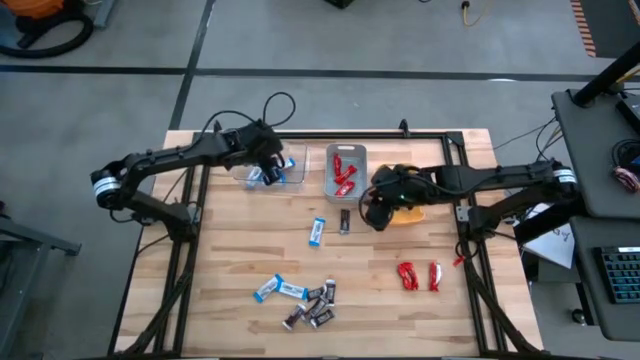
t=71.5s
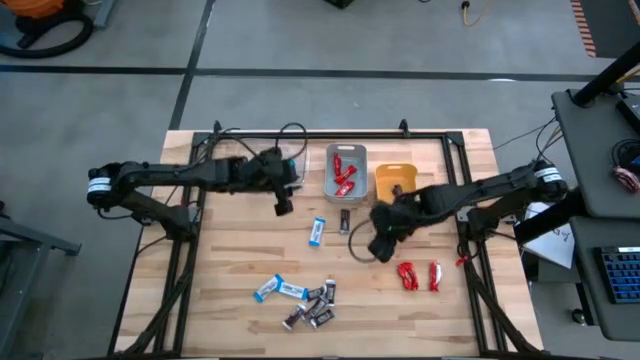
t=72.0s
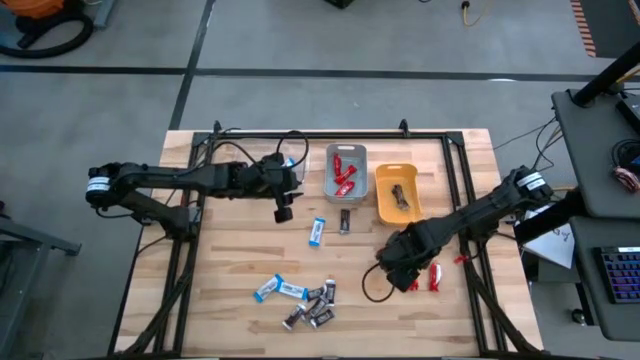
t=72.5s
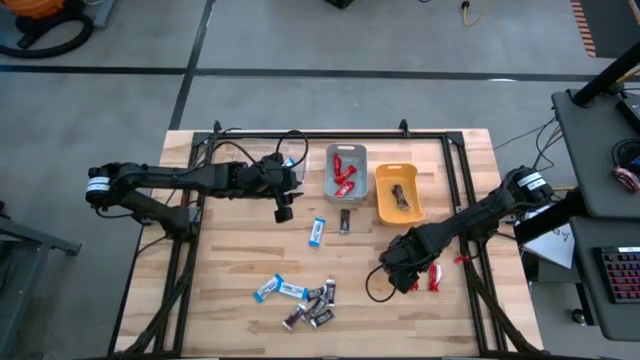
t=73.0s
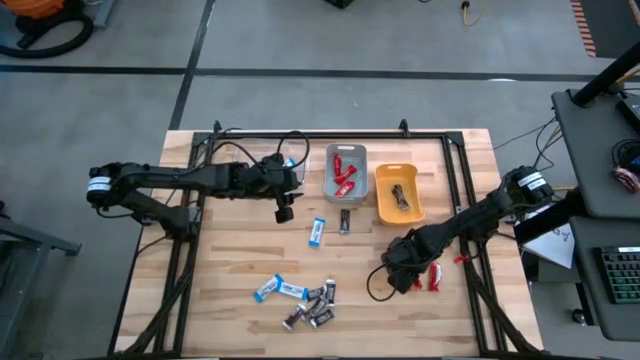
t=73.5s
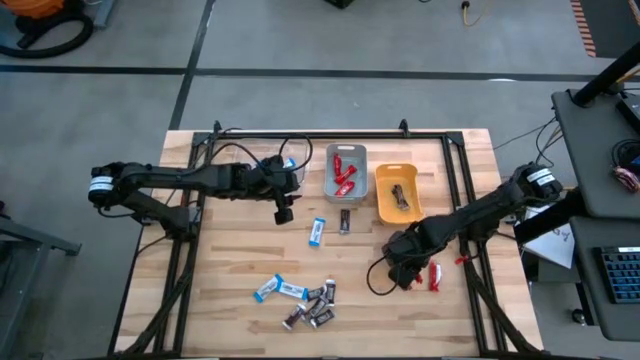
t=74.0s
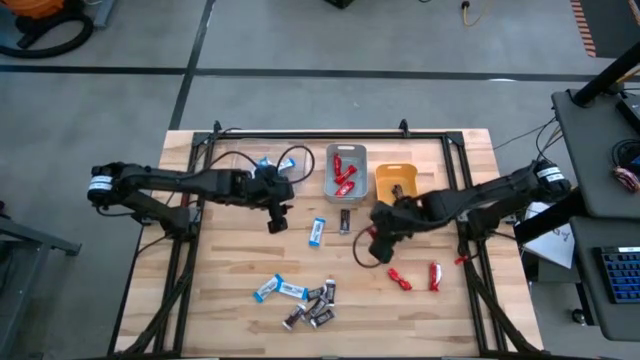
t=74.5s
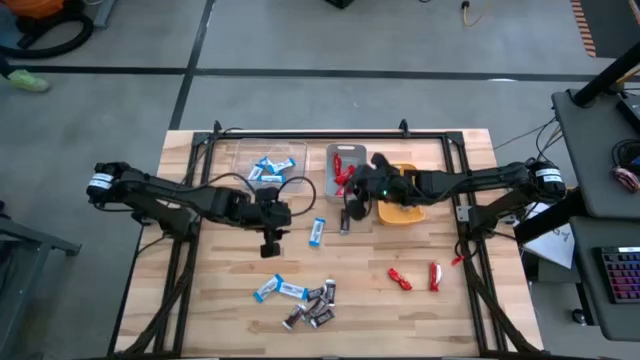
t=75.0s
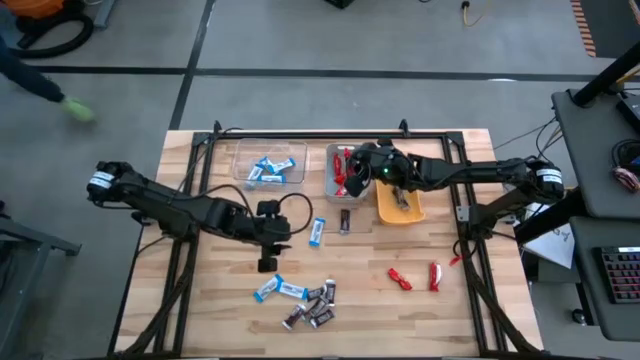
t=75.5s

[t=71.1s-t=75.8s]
Task: Organize candy in baskets
Put the red chocolate into the gray bin

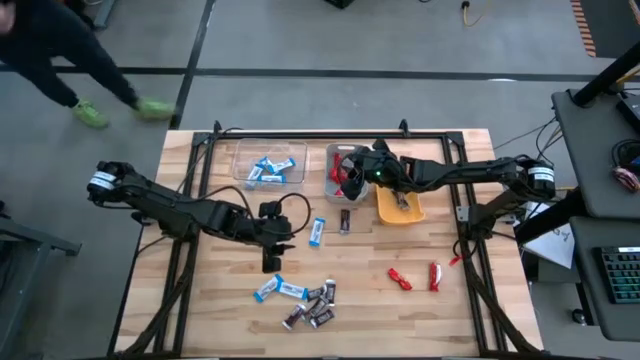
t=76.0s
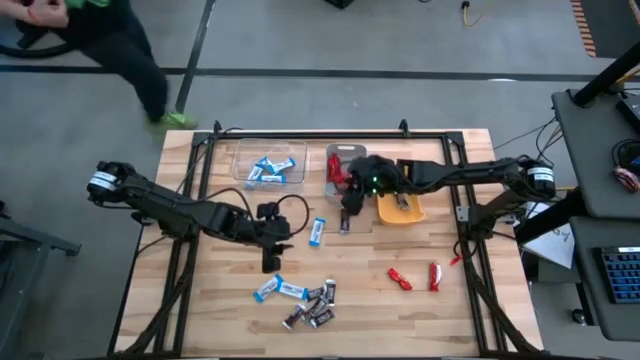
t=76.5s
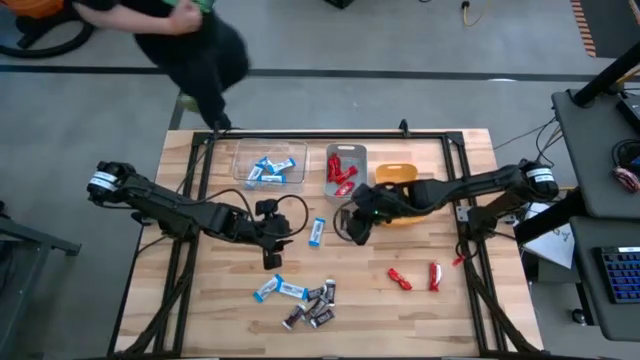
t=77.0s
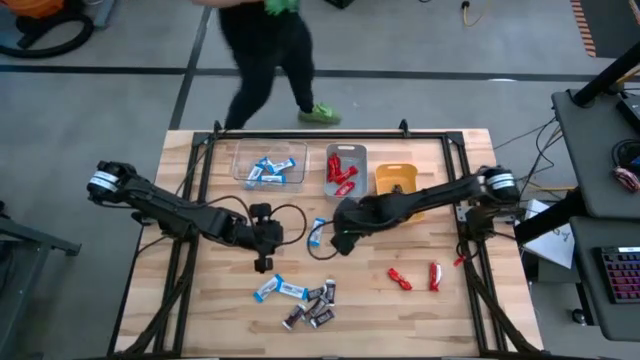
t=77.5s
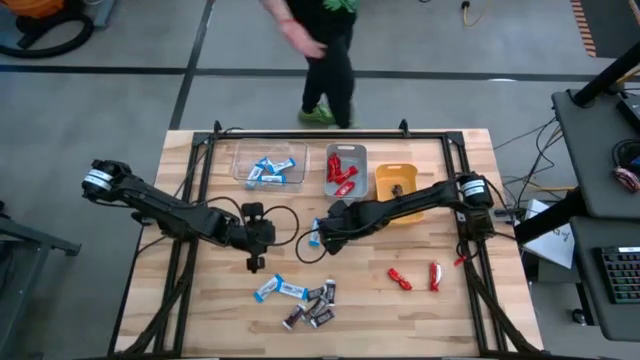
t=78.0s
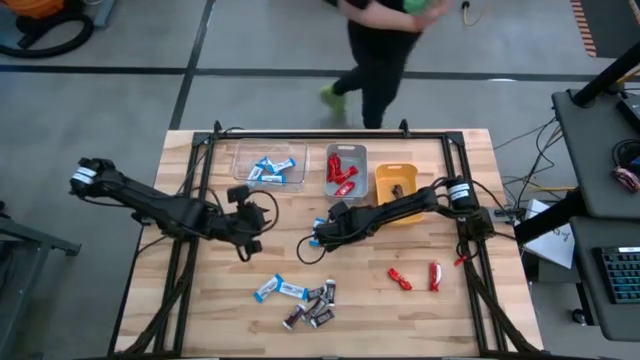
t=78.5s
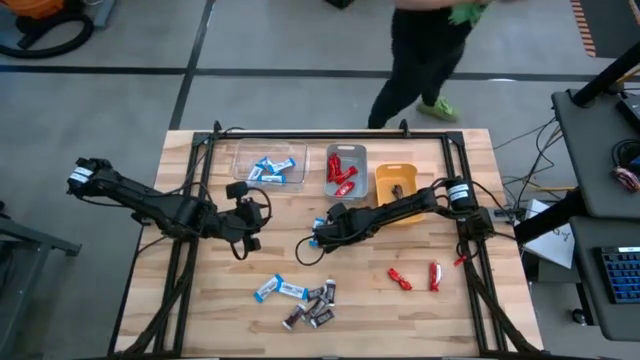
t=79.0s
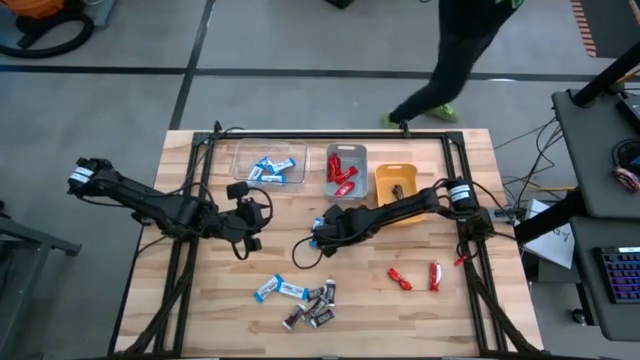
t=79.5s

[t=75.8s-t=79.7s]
Put the brown chocolate into the yellow bin

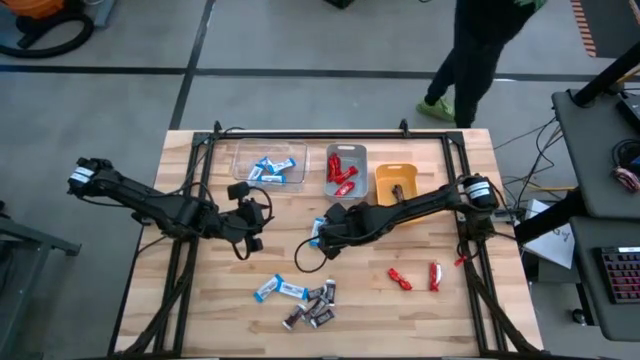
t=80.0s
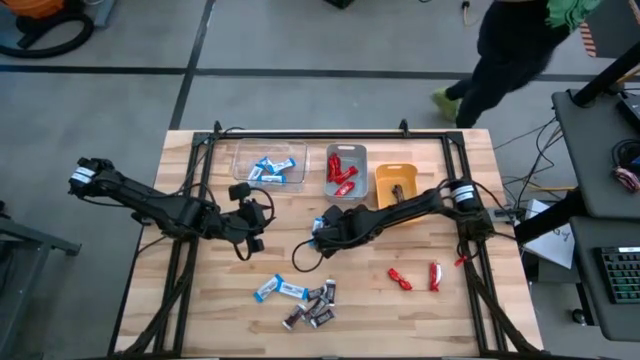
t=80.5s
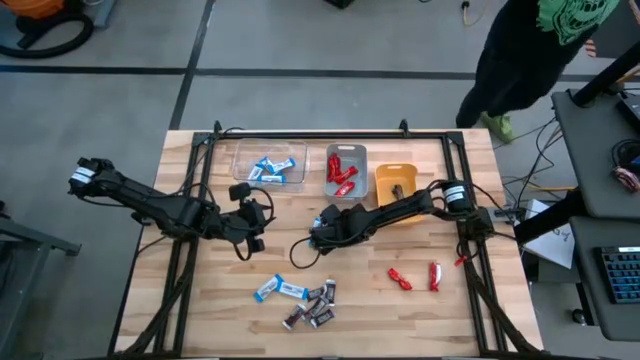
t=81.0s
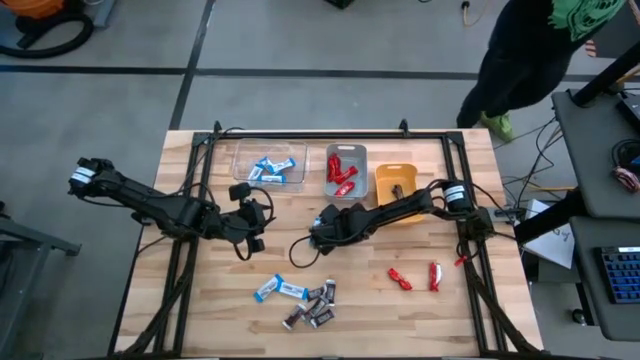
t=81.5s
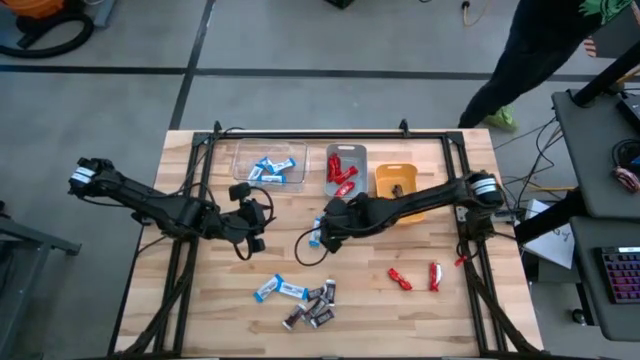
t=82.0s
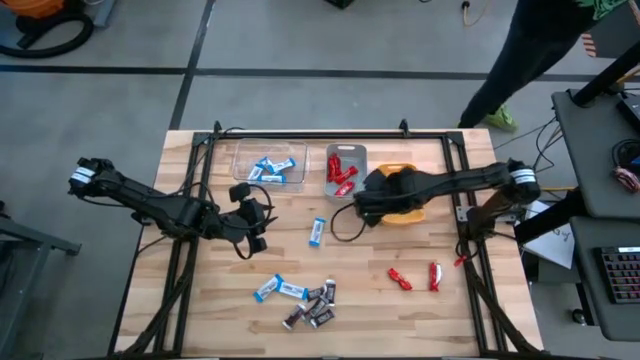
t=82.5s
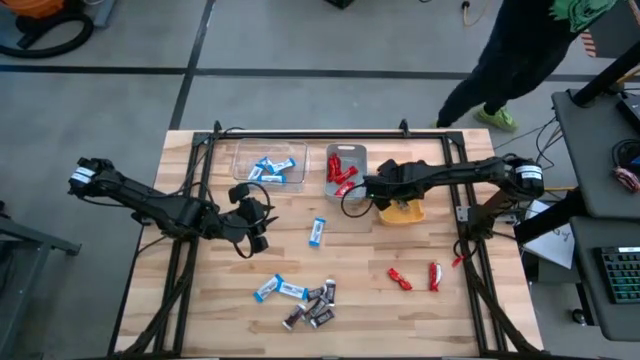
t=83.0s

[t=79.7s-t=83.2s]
Put the brown chocolate into the yellow bin

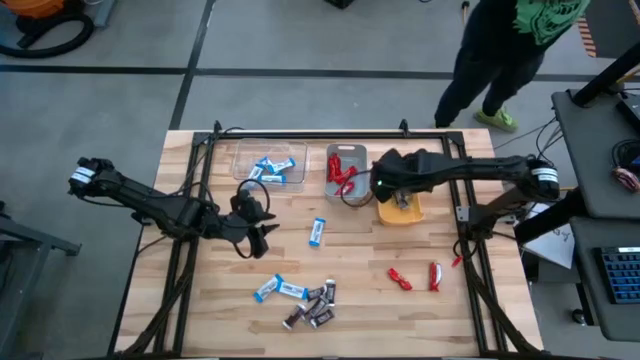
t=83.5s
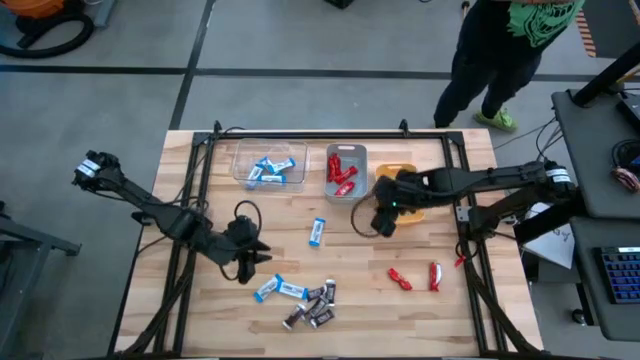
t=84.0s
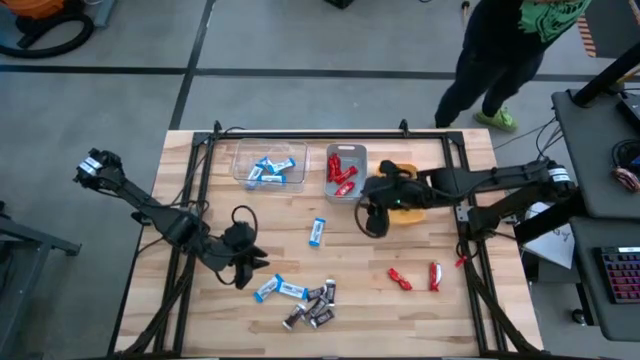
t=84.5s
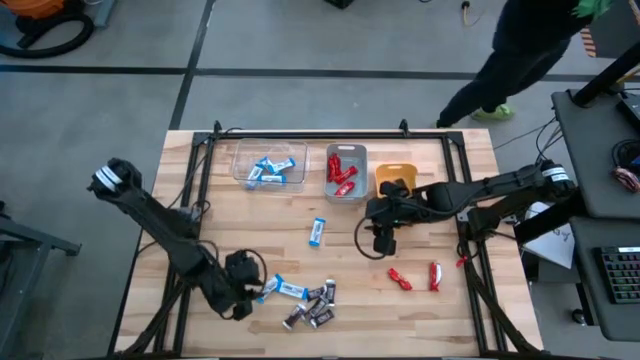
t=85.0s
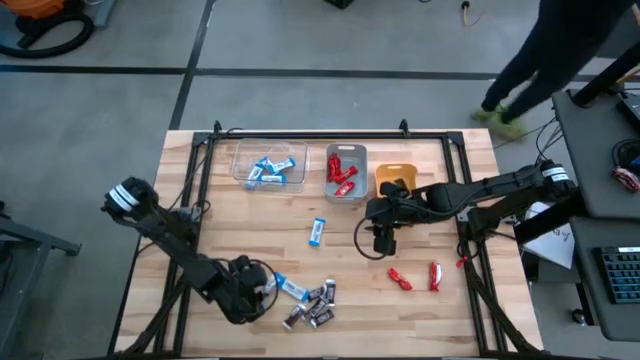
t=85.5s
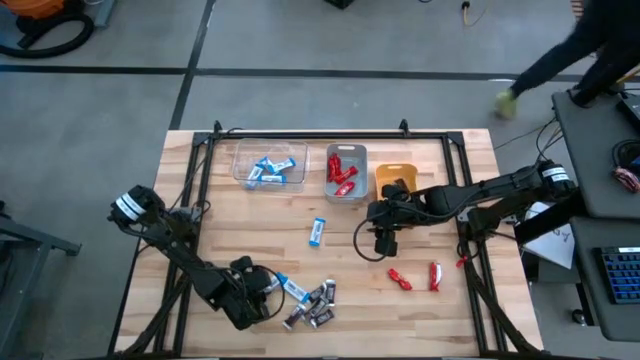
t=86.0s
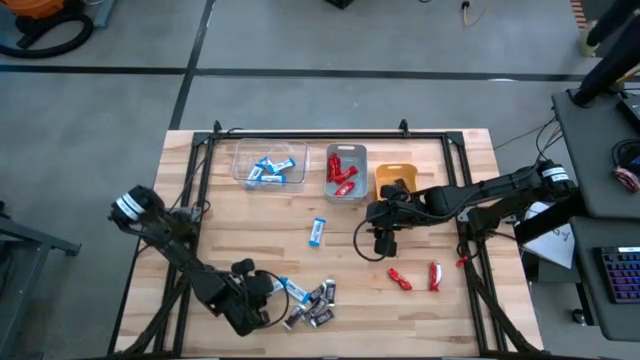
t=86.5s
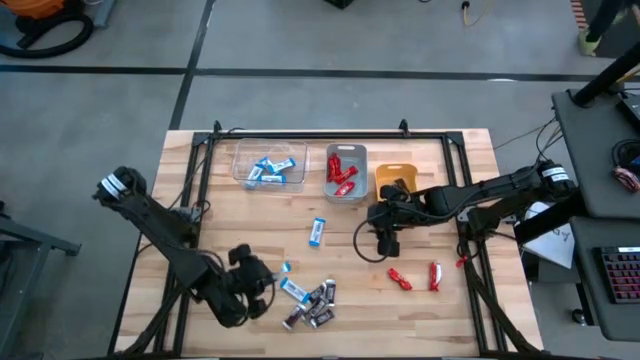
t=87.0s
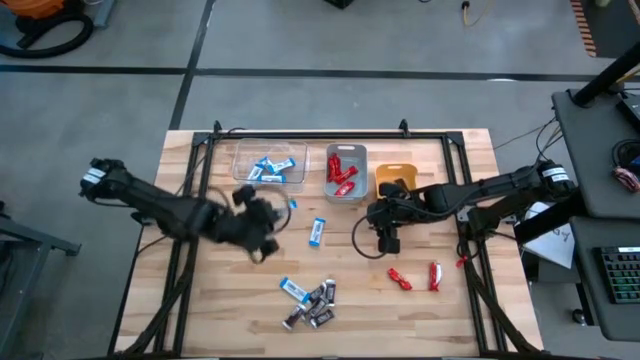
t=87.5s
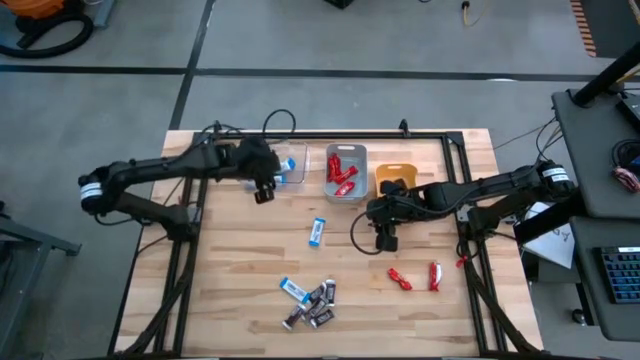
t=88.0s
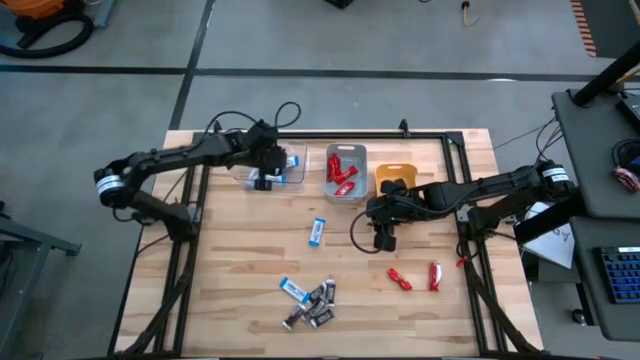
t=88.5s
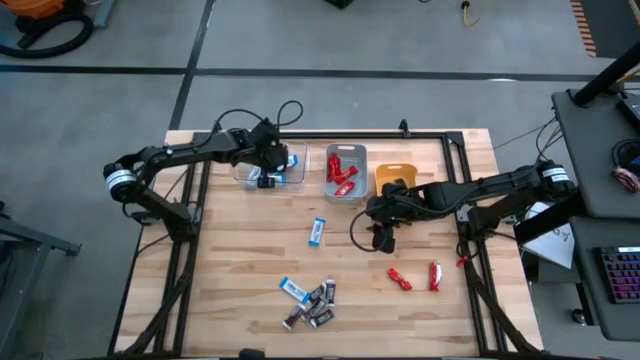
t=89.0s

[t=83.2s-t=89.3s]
Put the white chocolate into the transparent bin

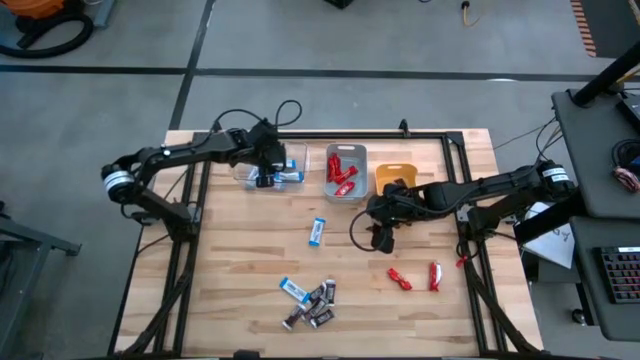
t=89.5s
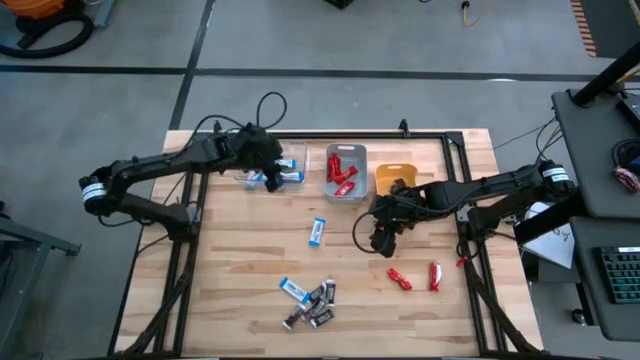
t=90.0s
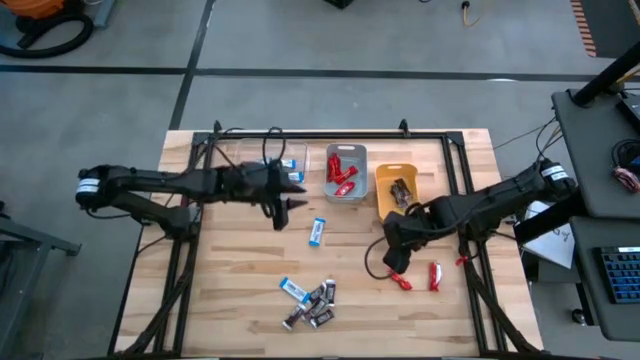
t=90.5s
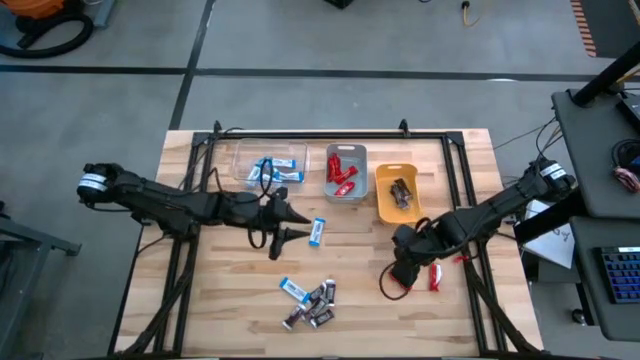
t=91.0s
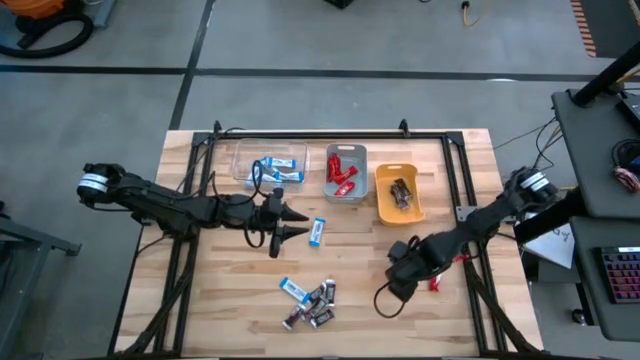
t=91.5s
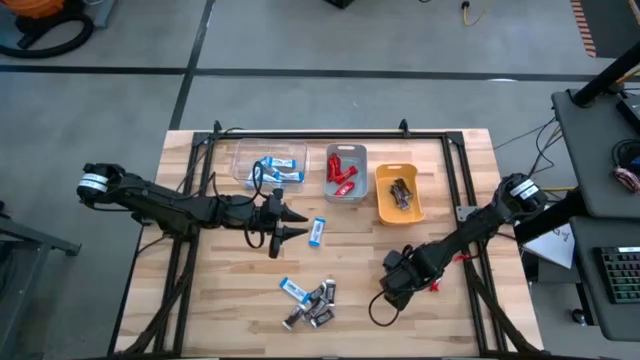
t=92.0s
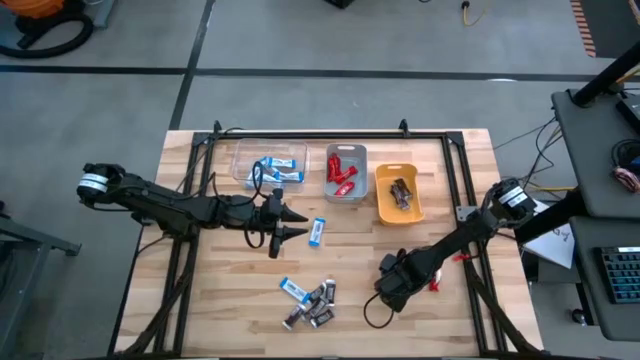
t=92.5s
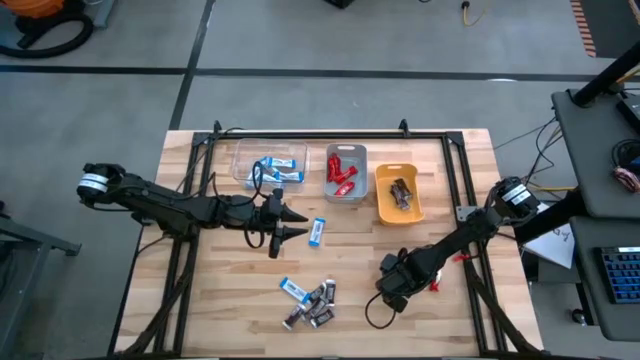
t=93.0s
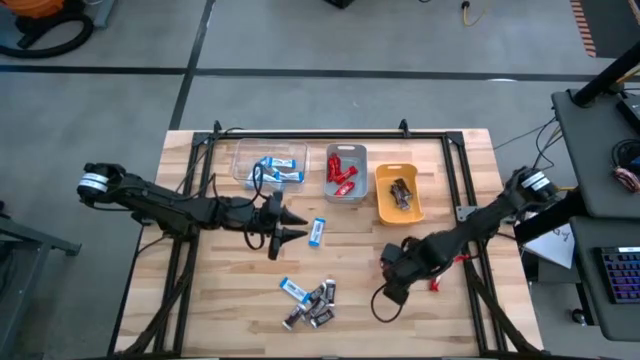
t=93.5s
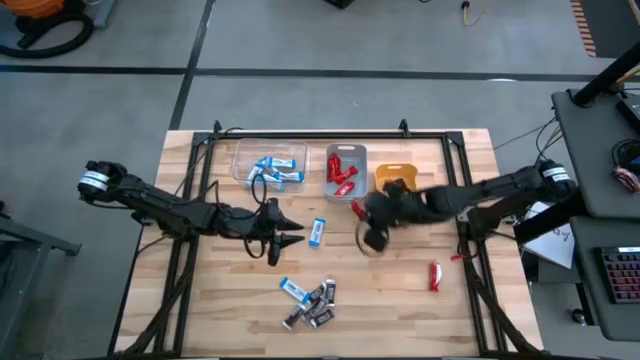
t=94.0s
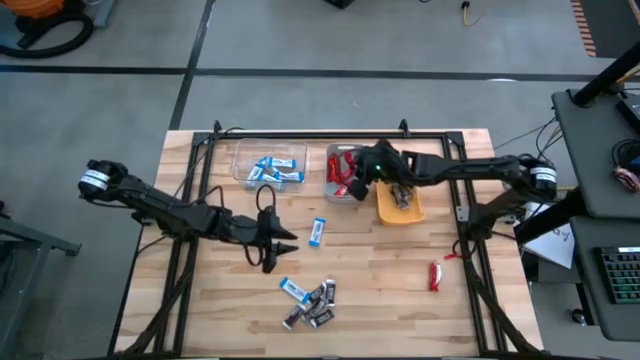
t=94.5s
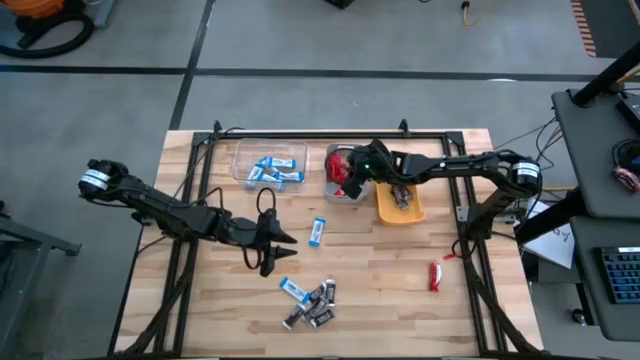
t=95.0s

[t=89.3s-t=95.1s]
Put the red chocolate into the gray bin
